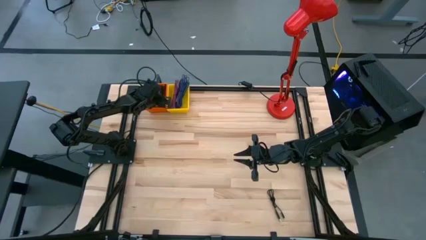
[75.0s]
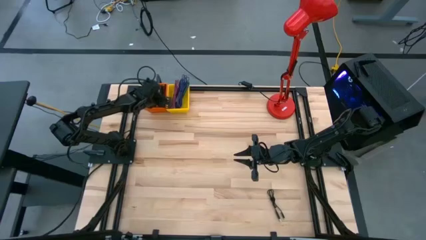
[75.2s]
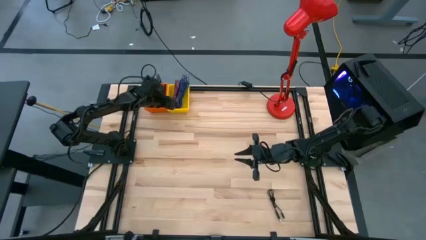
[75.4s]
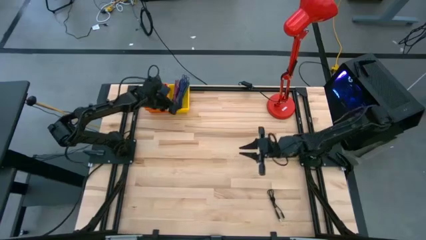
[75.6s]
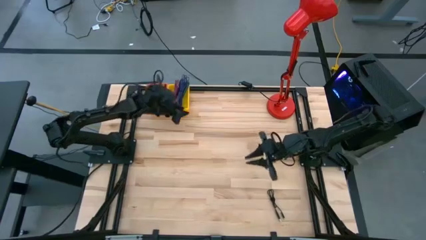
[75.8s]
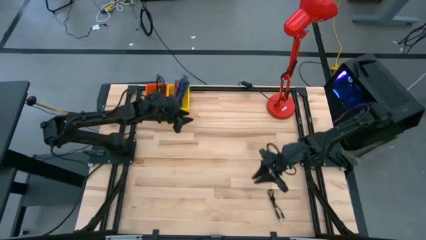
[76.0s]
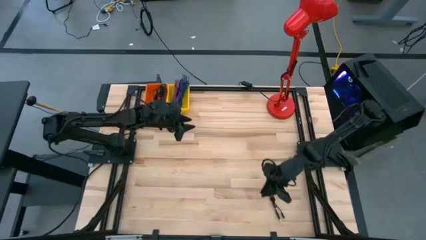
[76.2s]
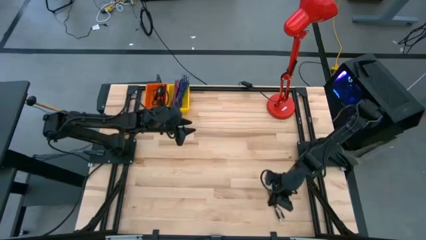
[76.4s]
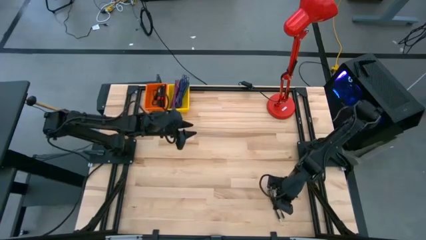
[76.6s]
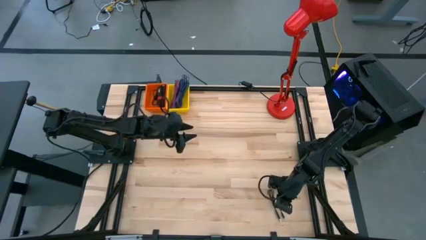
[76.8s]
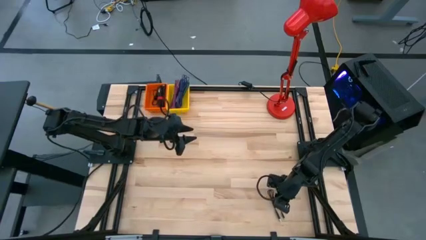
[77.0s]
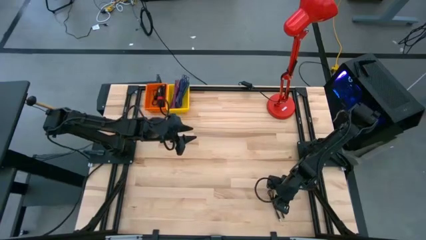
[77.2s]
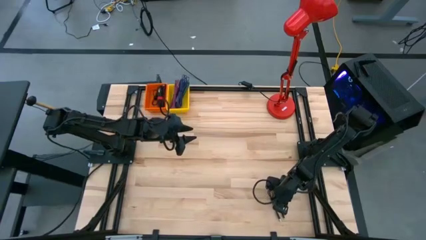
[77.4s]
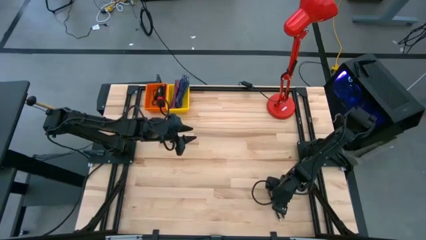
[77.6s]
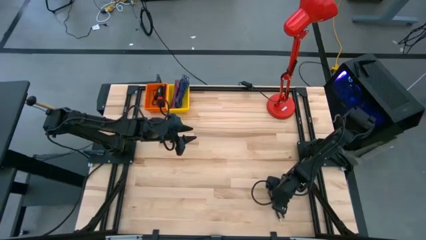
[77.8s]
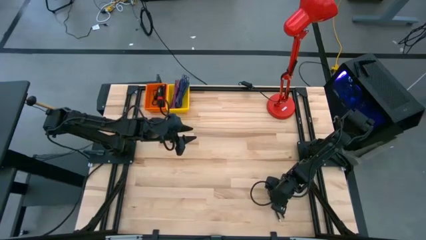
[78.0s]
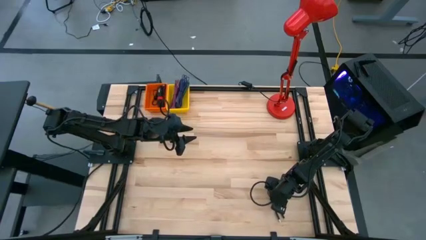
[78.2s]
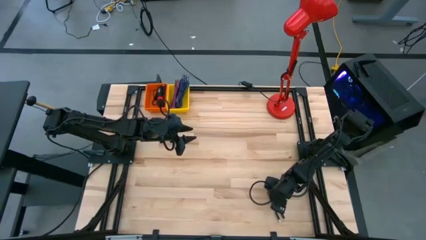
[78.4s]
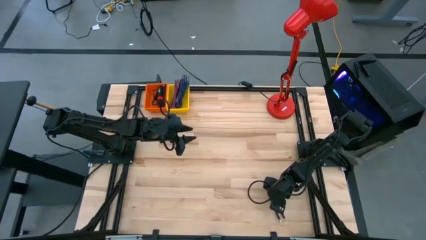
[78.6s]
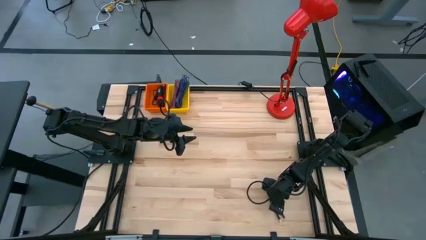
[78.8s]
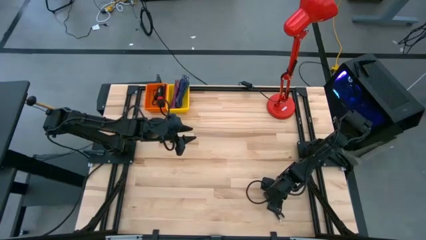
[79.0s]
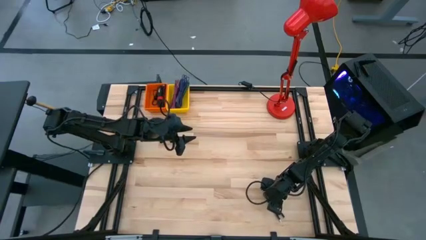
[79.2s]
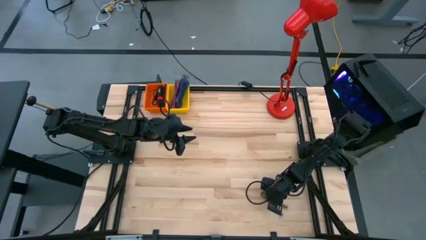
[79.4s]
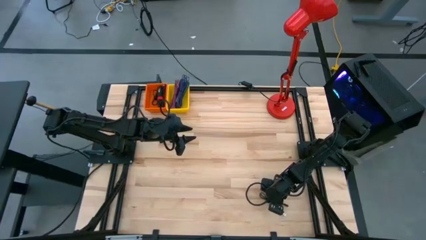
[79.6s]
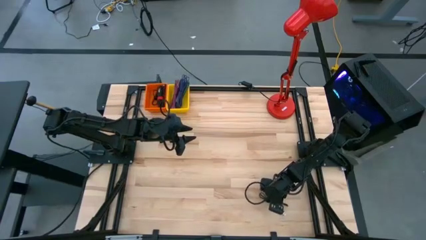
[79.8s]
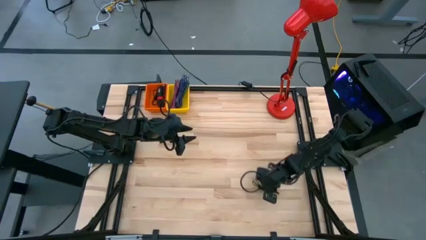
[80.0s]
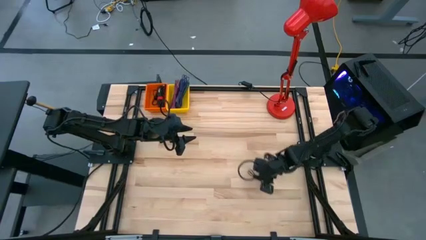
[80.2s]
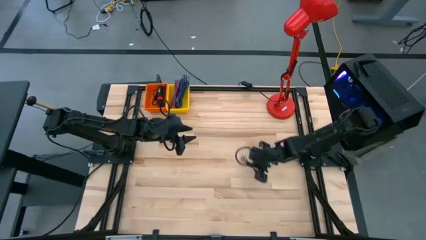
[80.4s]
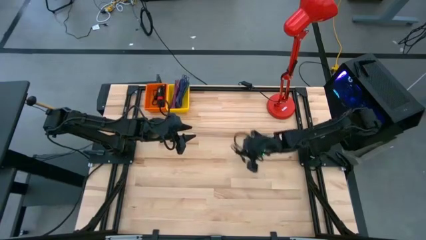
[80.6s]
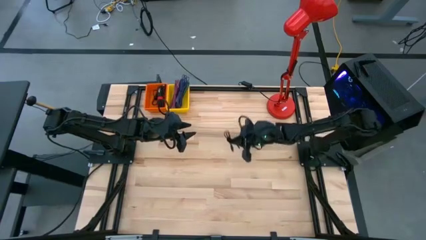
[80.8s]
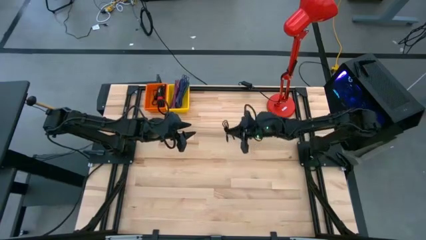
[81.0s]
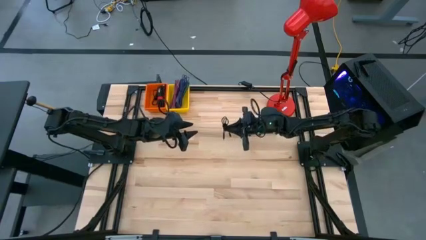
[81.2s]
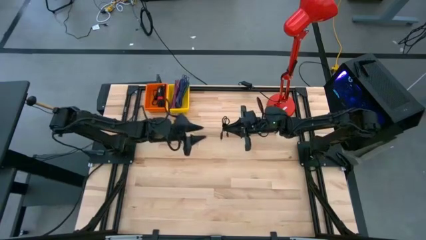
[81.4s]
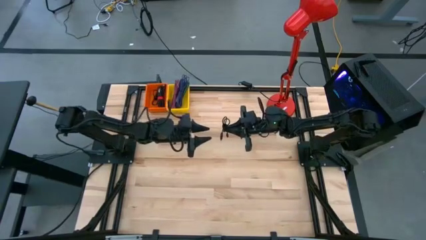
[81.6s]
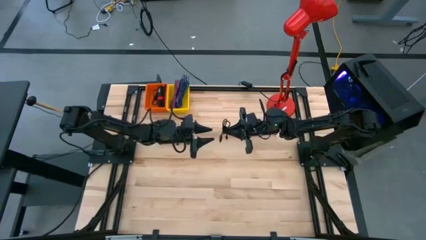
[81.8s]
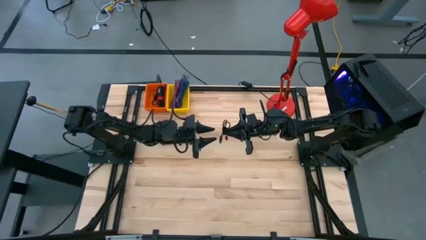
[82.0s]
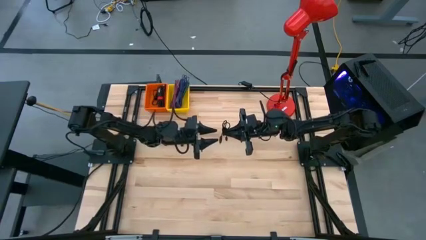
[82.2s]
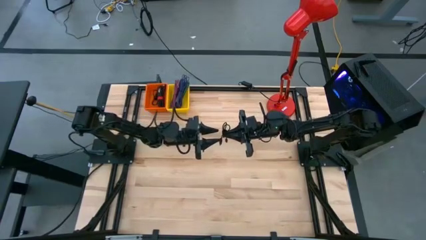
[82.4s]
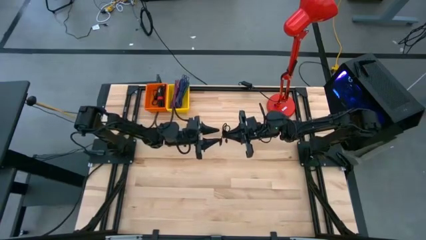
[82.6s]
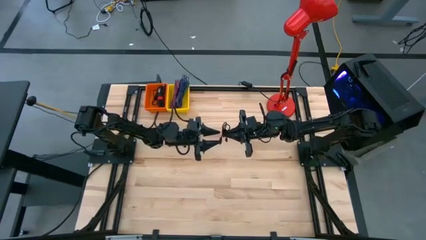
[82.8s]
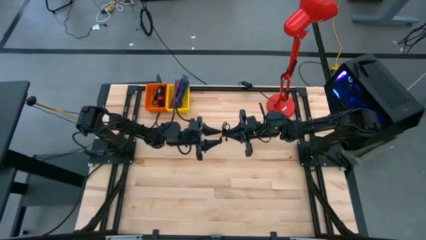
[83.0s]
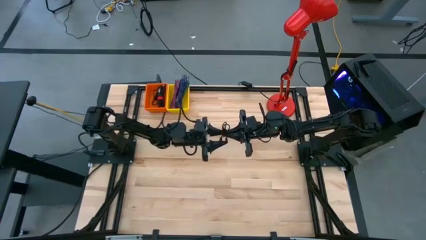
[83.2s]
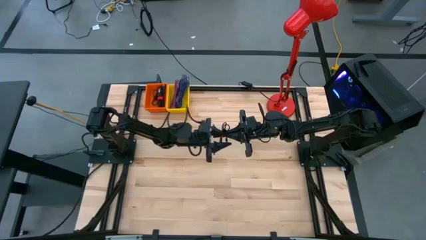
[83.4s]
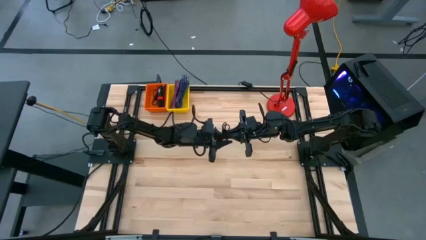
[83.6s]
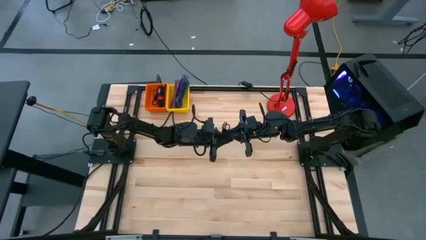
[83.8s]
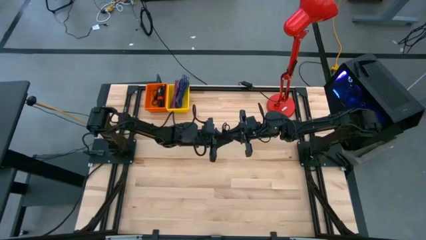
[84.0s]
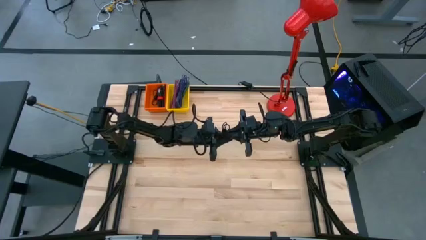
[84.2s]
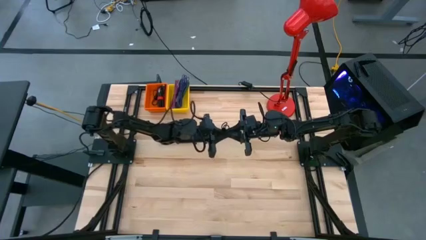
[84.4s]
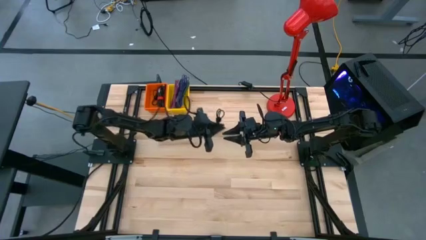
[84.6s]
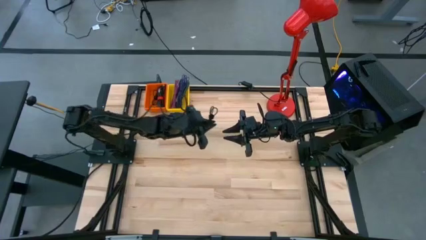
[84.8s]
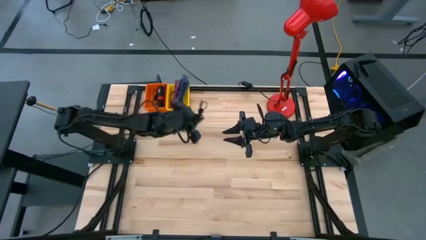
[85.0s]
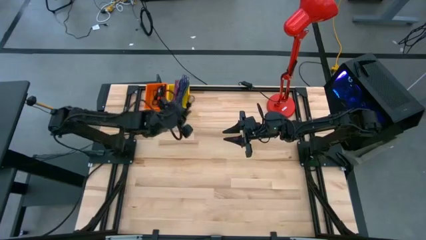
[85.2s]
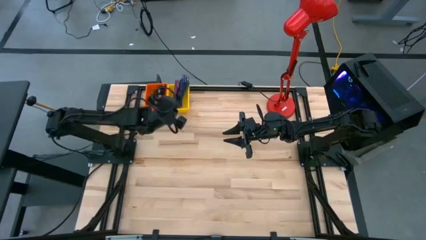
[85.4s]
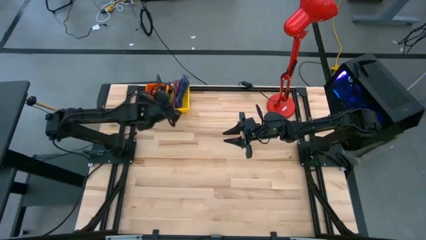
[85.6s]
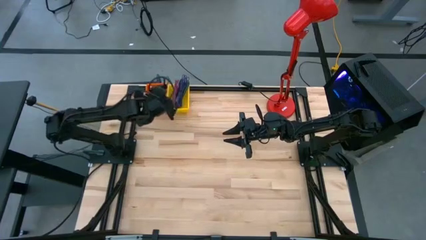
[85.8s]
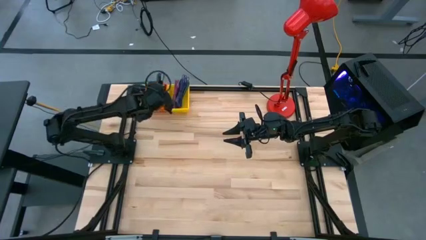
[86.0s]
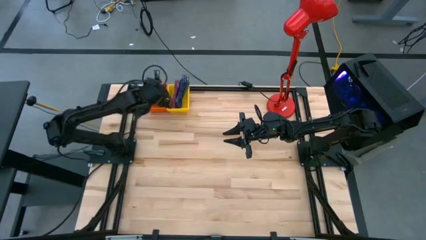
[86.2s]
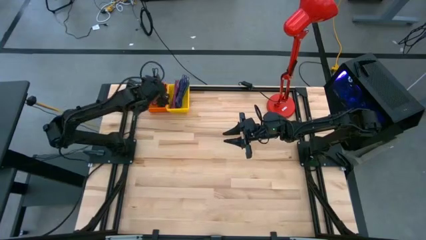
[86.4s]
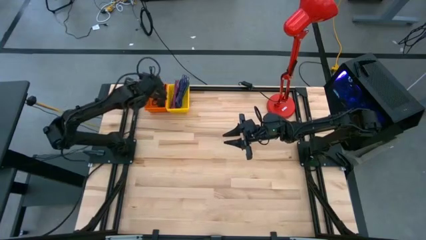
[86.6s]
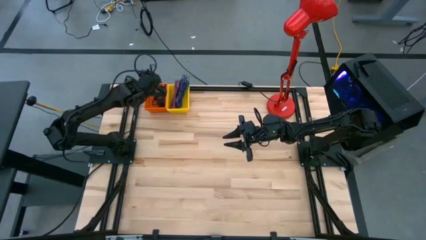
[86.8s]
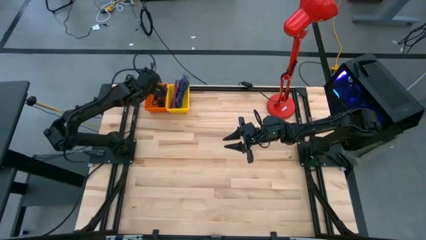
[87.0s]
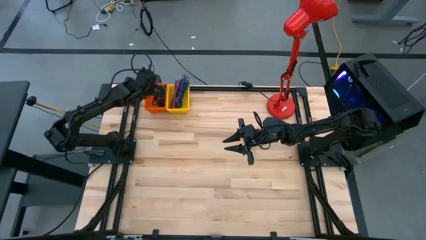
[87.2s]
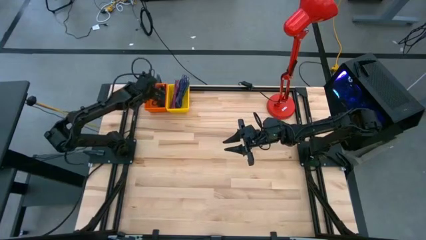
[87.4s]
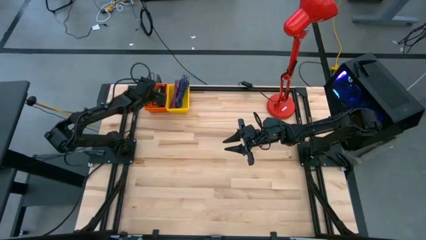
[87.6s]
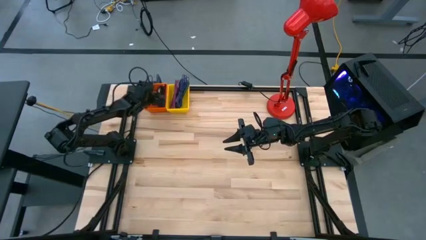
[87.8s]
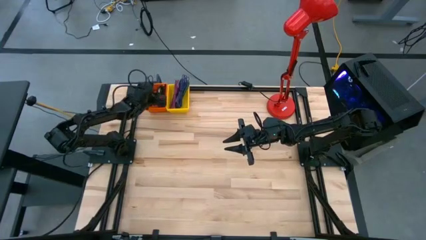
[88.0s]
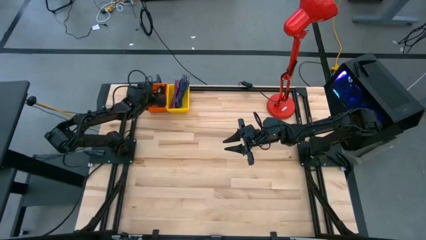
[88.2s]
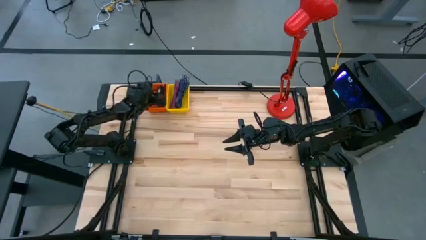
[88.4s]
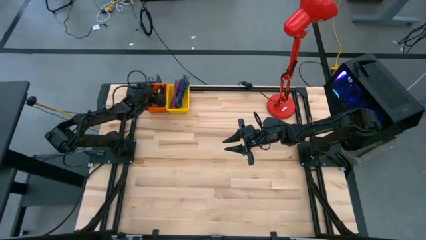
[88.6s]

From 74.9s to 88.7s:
Task: Pick & Place USB Port
Put the black USB cable into the orange bin

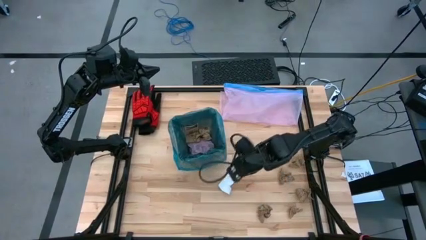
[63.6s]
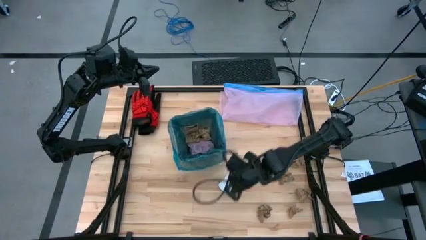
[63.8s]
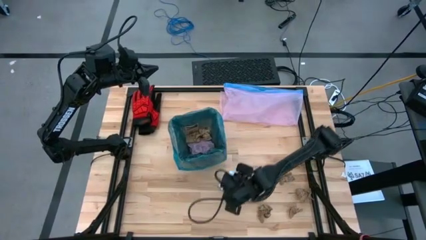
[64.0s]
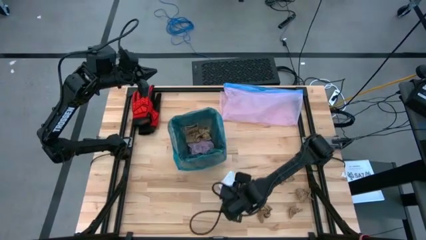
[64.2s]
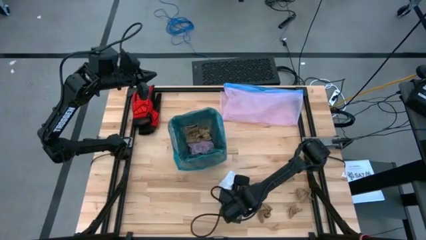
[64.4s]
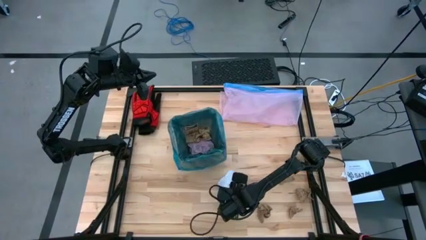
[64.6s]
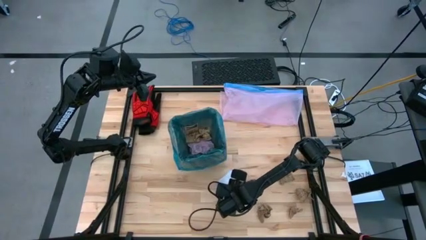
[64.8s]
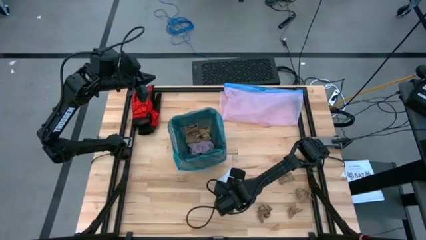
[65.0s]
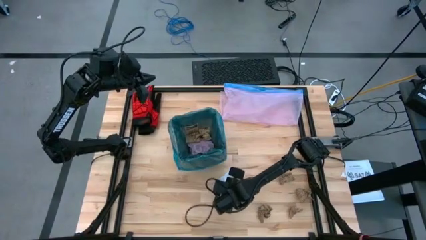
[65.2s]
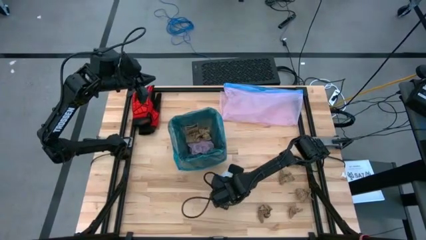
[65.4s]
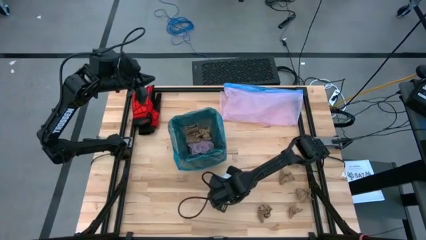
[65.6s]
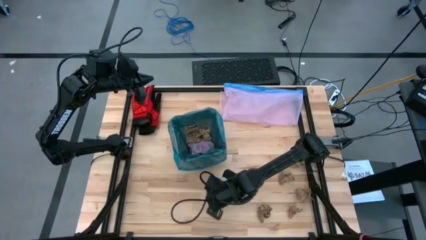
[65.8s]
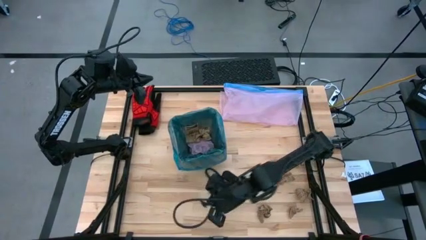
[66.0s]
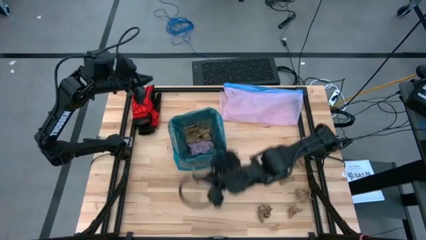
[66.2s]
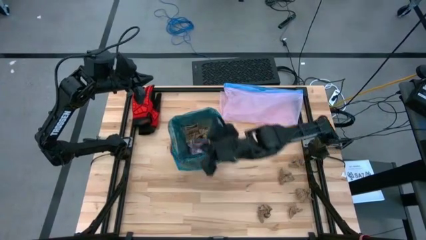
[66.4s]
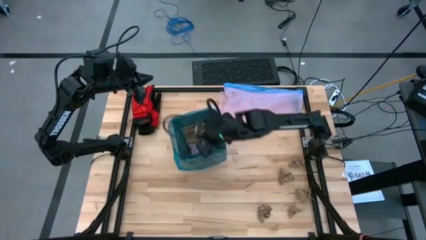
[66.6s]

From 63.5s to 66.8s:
Task: place trash/remove bag and relplace
Put the piece of white cardboard into the black trash bin
